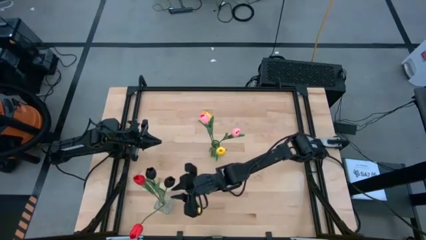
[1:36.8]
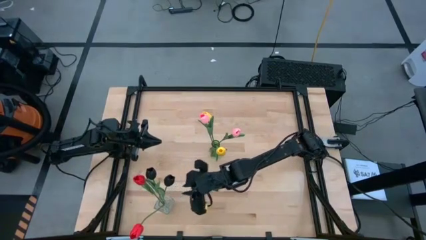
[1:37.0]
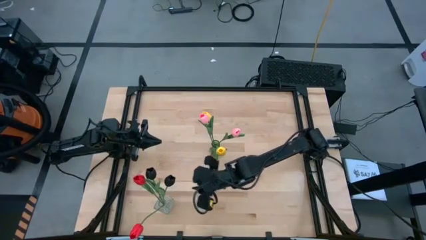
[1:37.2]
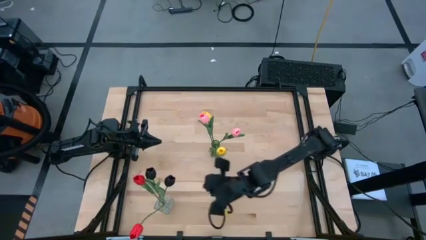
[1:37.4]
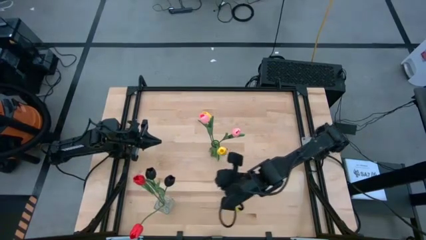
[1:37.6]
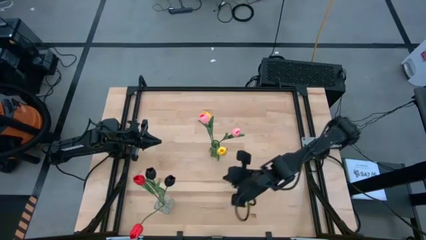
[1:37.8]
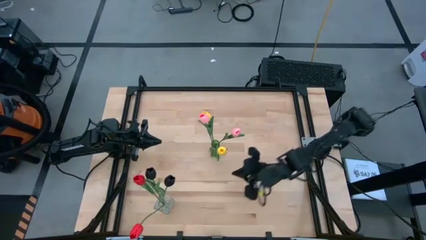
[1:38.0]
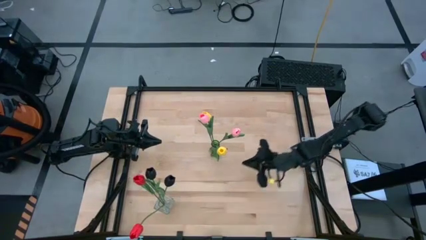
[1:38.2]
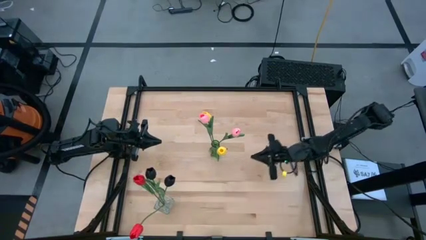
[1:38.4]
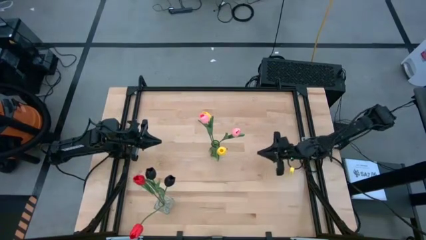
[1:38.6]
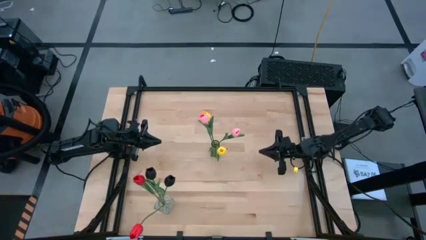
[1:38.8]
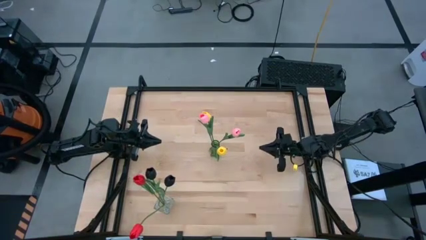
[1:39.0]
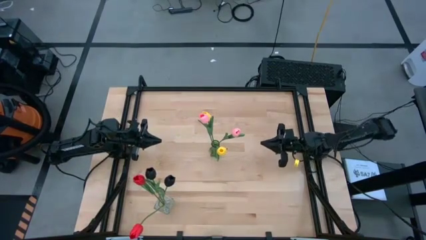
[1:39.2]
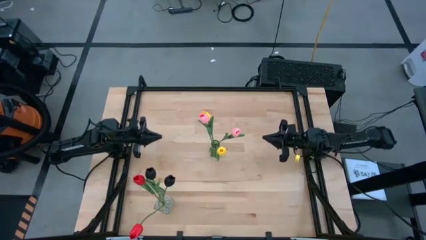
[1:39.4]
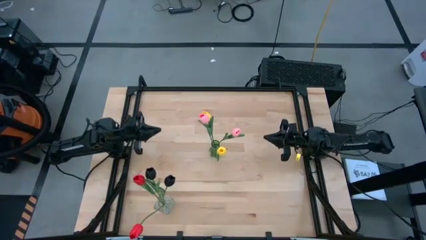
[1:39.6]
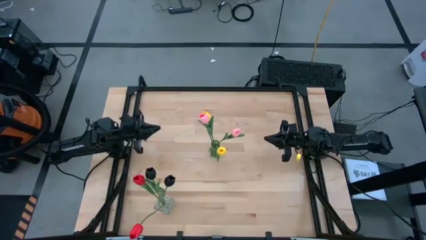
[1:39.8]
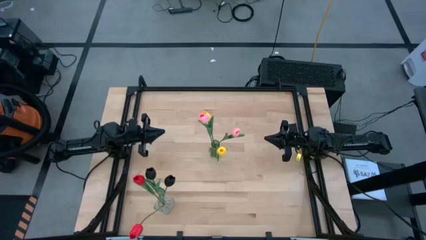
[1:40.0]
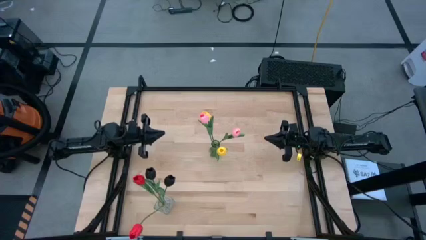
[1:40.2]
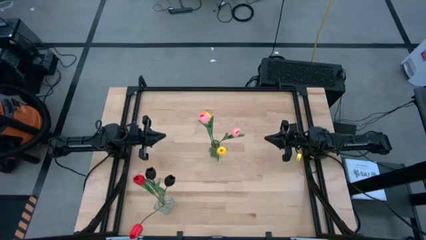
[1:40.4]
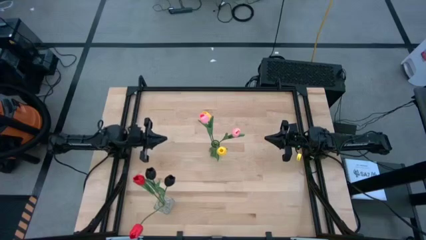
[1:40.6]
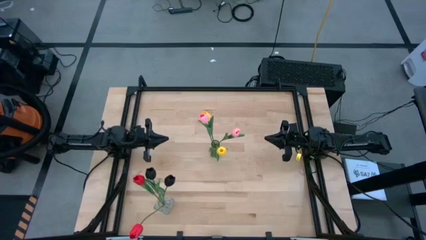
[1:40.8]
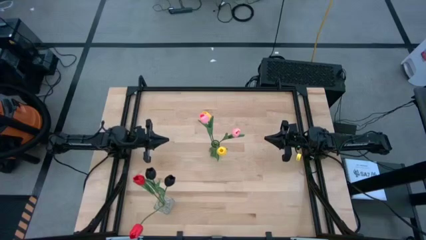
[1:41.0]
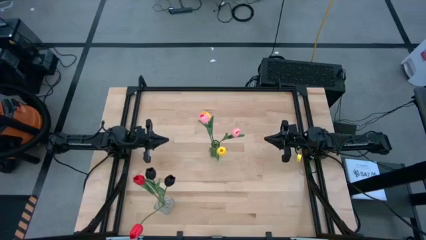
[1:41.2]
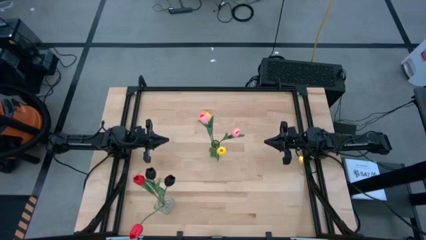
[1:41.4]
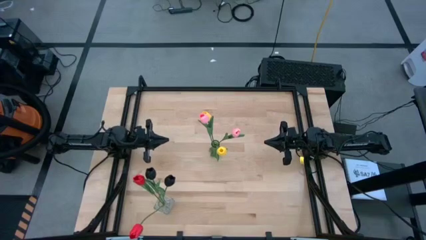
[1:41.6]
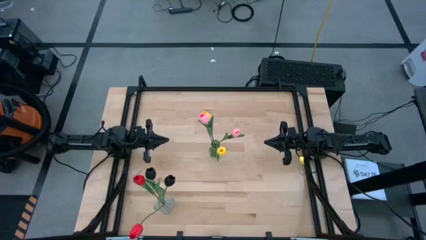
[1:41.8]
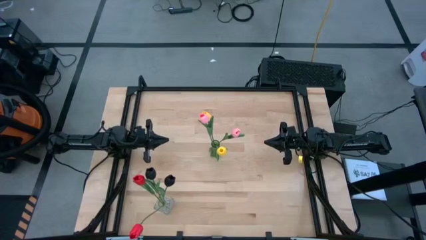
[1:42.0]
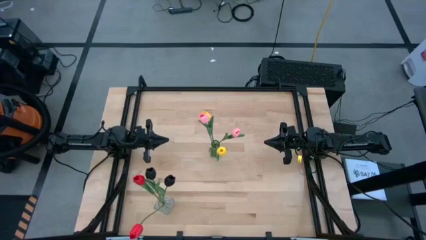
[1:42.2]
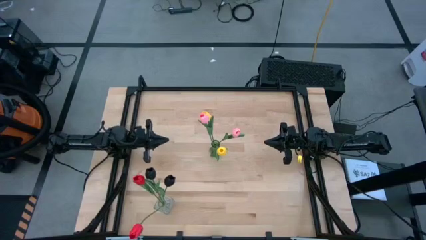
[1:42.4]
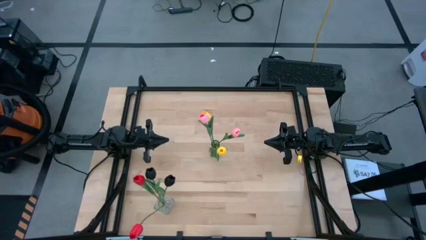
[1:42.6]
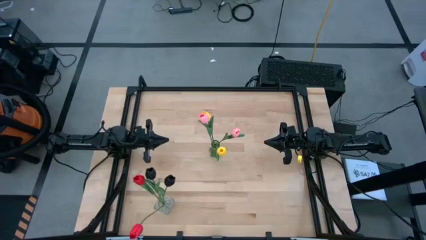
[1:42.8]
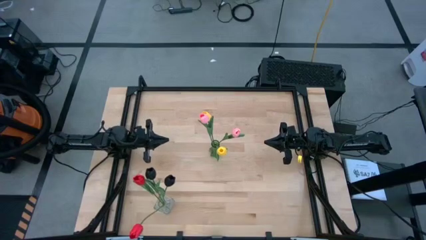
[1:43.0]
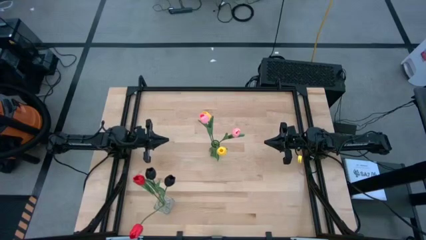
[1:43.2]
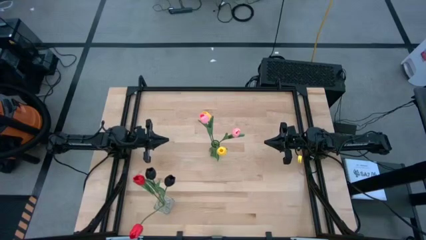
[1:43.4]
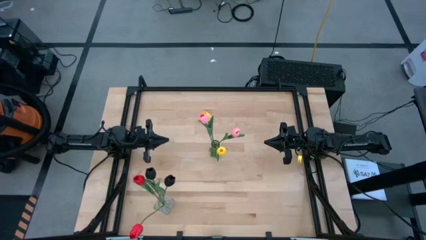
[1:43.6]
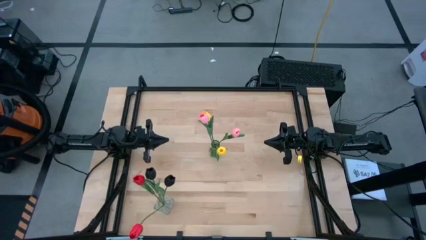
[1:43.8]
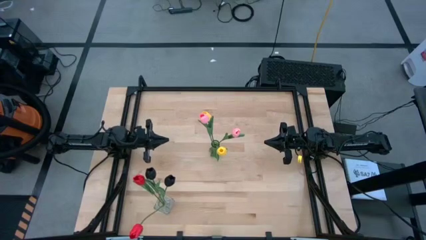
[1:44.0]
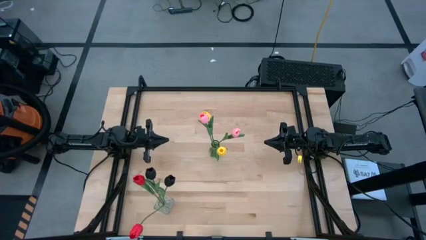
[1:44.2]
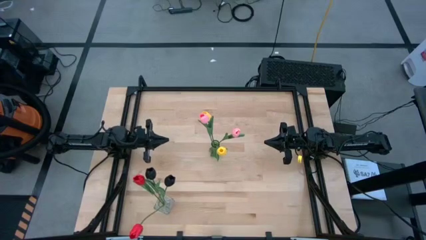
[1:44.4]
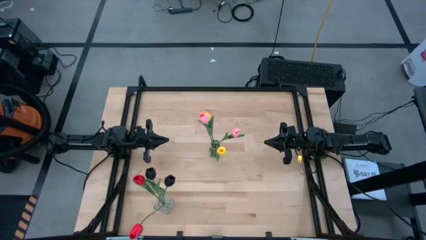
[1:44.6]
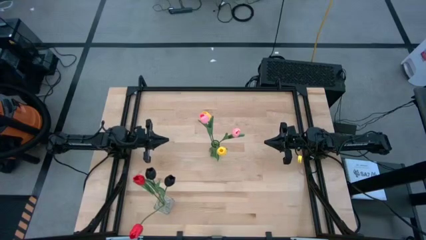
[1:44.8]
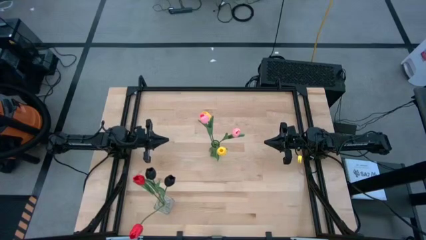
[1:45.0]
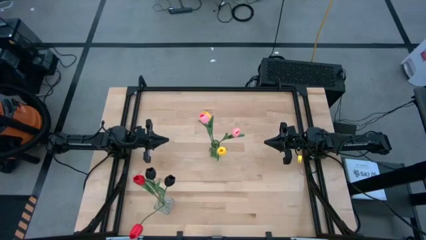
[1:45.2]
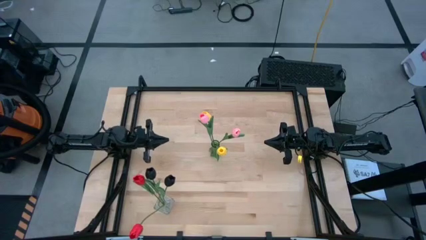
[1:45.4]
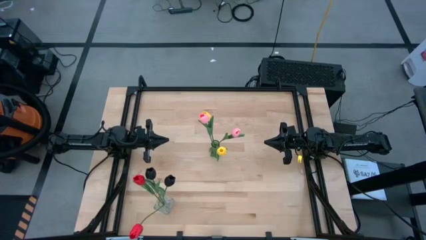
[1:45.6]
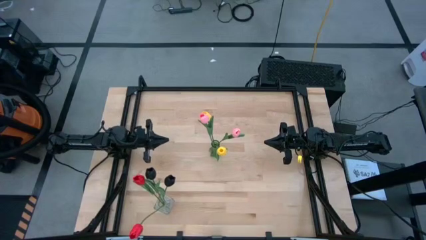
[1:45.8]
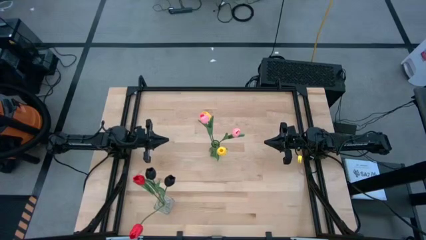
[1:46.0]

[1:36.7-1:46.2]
Task: Sort flowers into vase by color
Return to Home Position

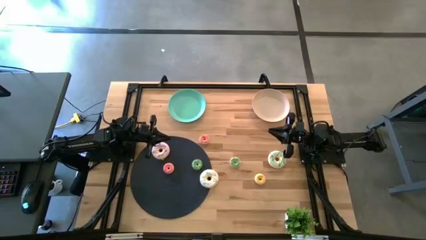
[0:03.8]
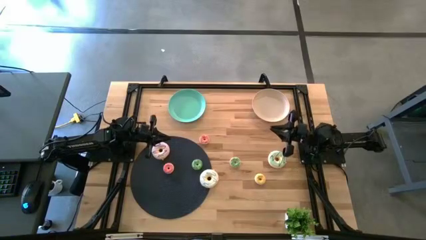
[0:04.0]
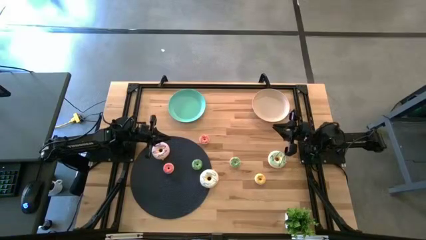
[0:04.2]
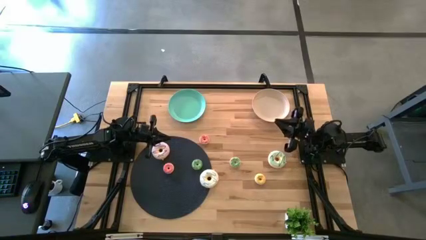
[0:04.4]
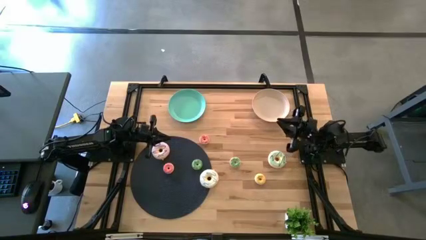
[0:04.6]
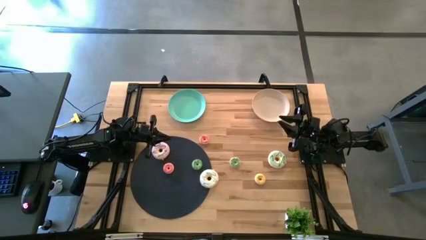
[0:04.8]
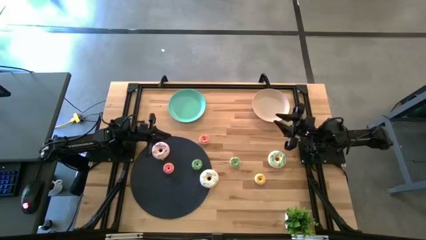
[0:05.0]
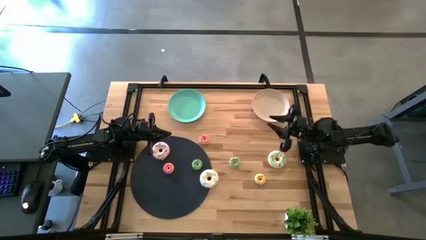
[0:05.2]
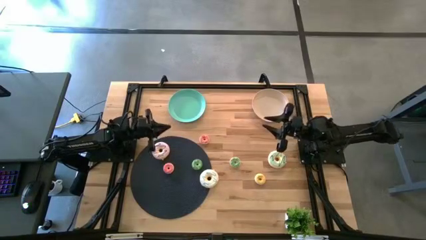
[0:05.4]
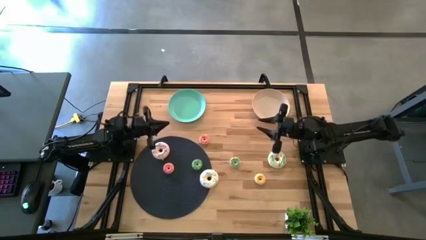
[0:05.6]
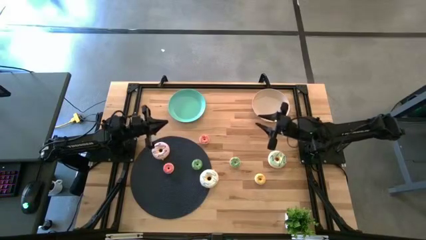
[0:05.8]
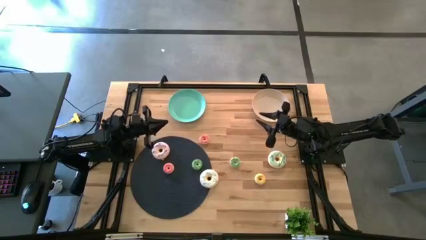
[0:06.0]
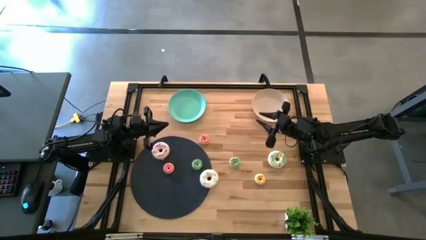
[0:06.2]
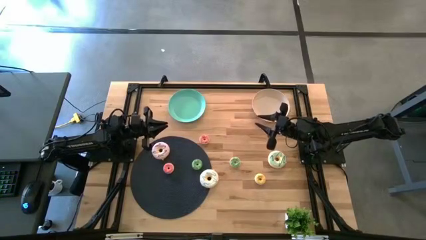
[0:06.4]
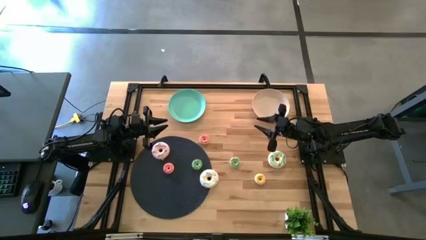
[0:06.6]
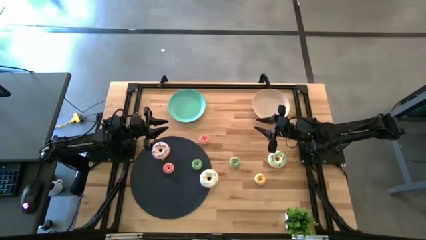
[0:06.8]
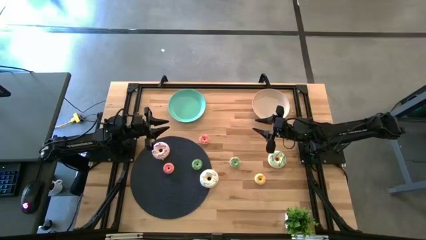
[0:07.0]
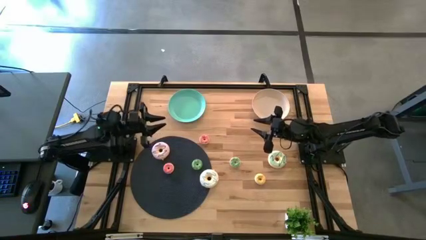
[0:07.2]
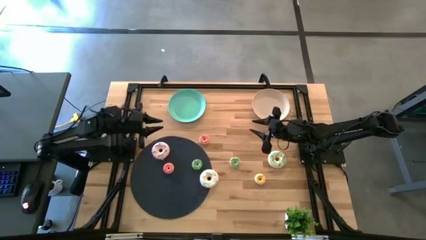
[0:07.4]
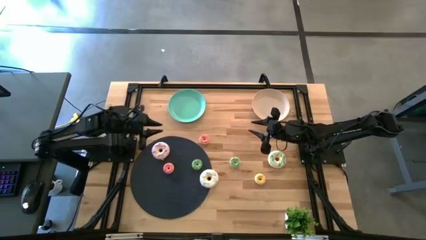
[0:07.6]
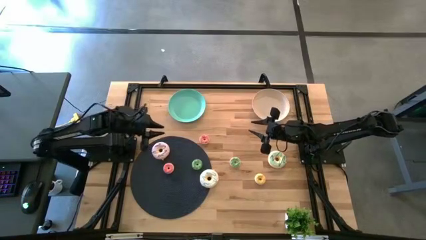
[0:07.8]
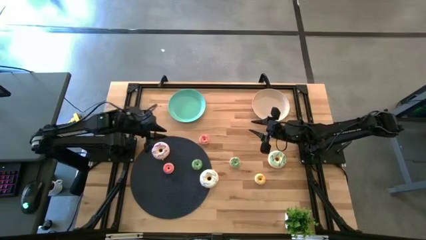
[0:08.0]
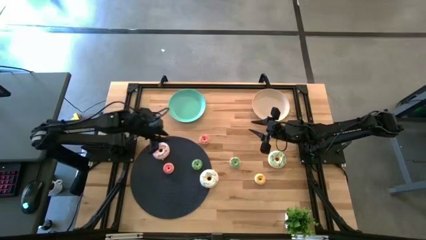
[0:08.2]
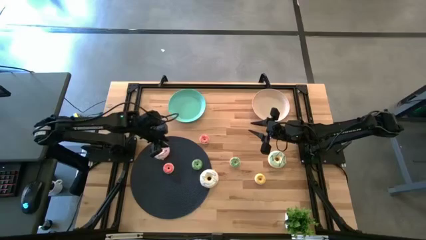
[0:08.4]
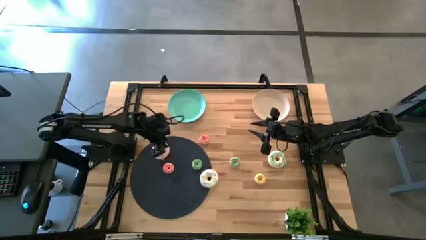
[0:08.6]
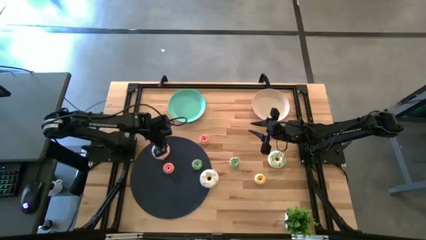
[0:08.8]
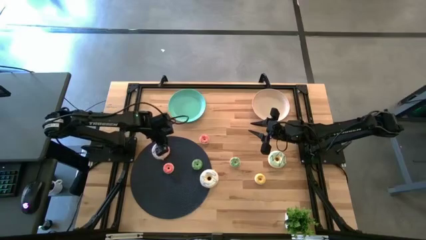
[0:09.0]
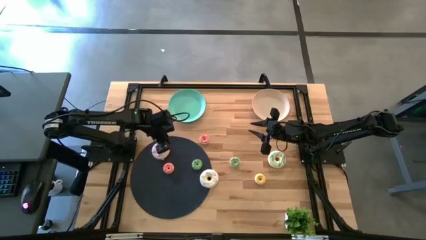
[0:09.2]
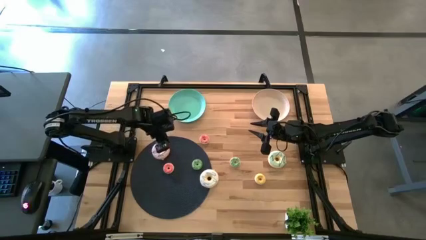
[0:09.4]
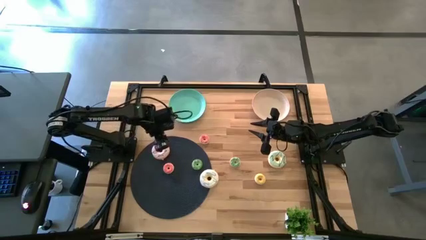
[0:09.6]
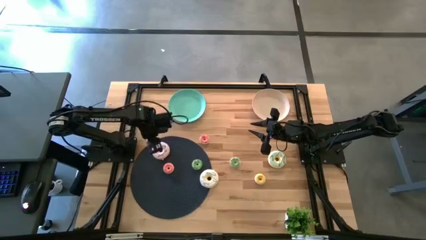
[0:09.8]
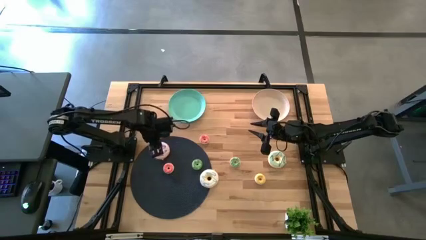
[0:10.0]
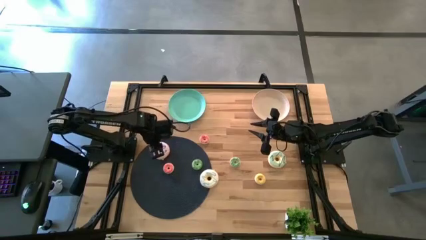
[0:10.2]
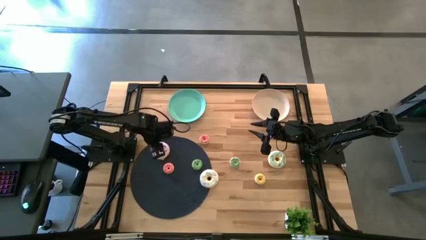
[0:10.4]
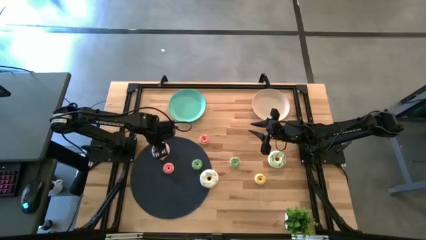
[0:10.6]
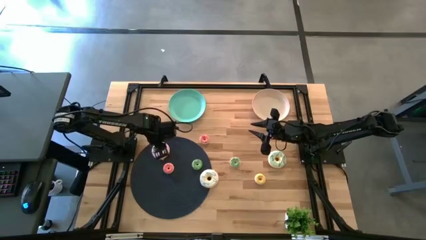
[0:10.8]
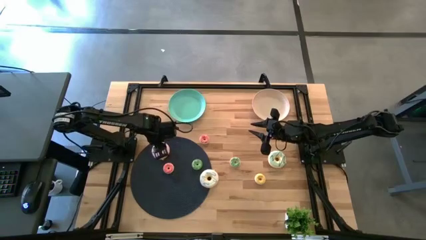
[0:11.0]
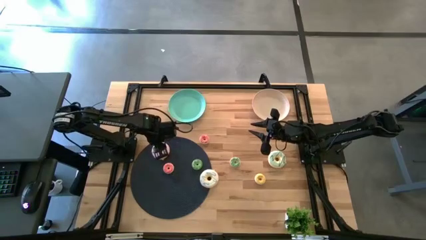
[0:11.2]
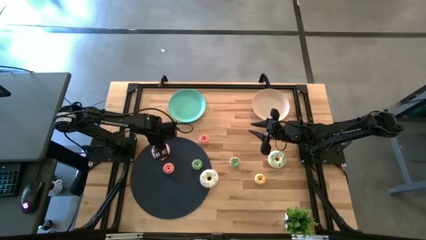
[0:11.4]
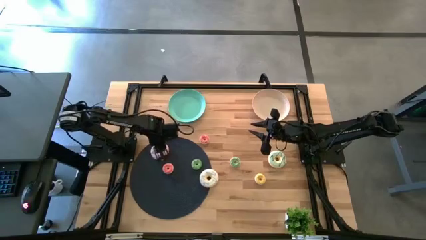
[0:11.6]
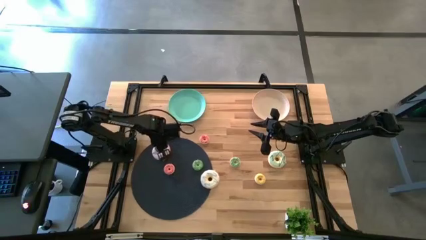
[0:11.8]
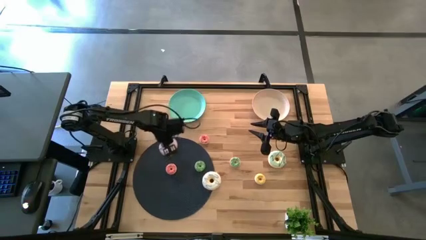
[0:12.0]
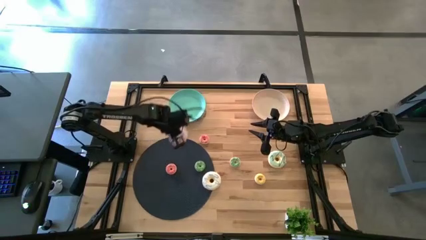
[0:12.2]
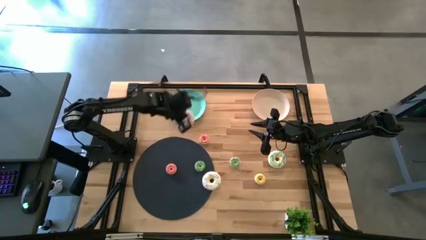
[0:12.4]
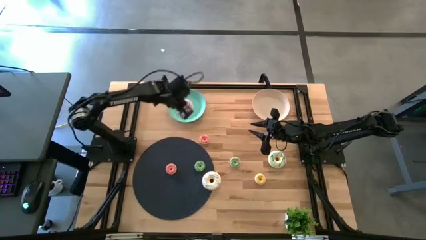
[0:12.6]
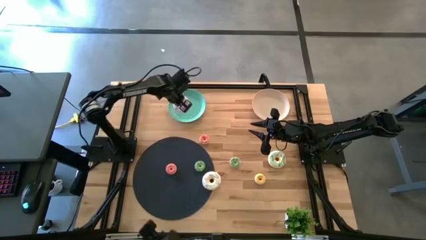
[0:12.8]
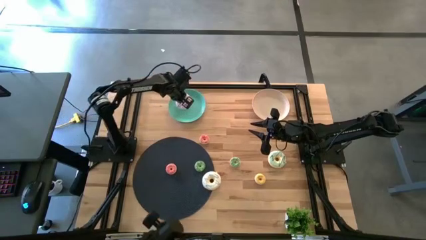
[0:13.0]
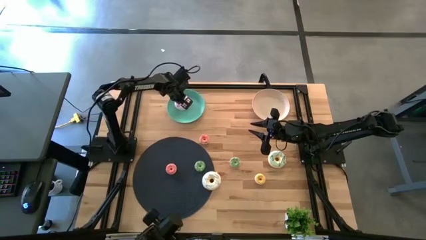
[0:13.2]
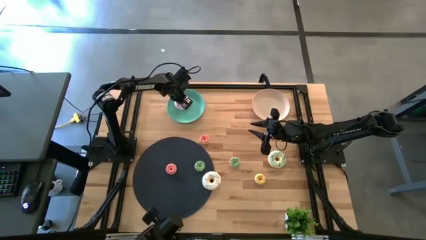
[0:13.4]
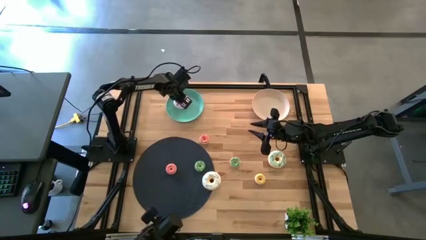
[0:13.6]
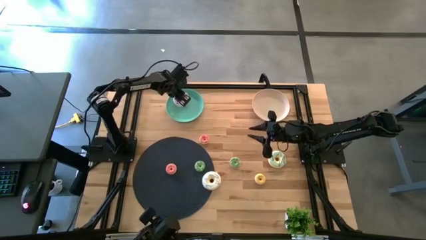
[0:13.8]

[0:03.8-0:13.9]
Task: Pick & Place donuts
Put the large violet donut on the green plate
